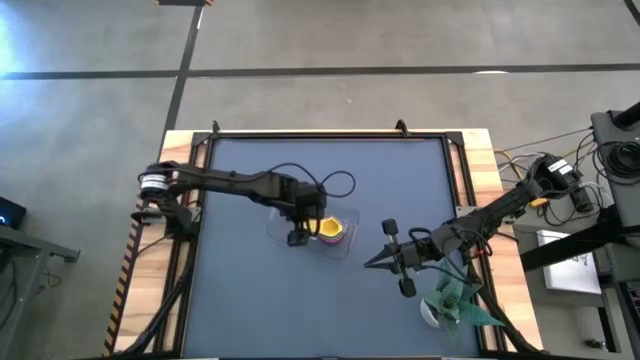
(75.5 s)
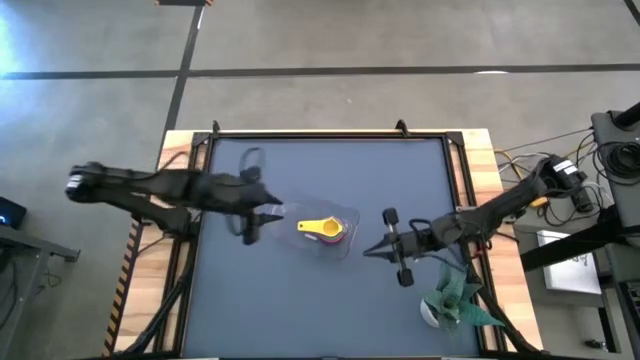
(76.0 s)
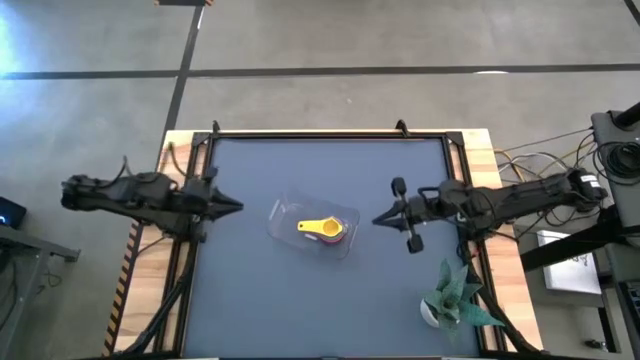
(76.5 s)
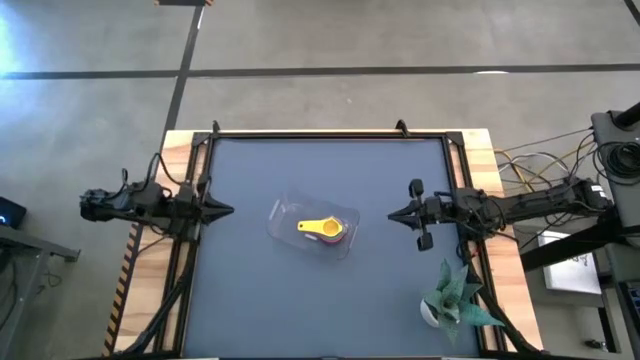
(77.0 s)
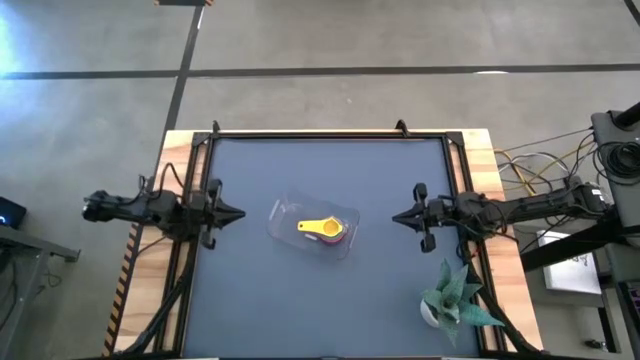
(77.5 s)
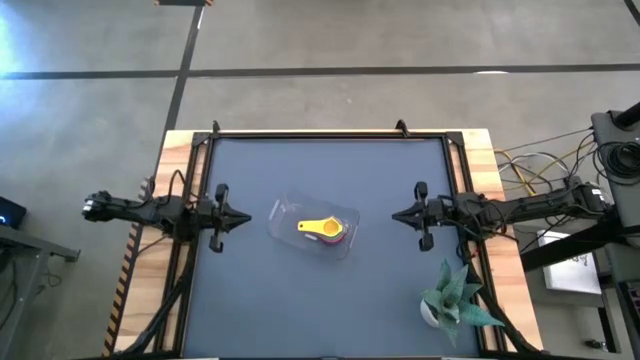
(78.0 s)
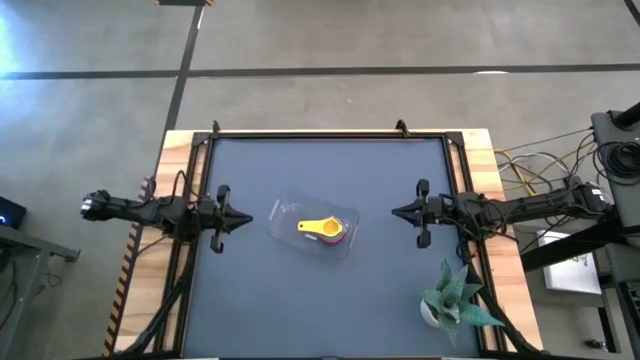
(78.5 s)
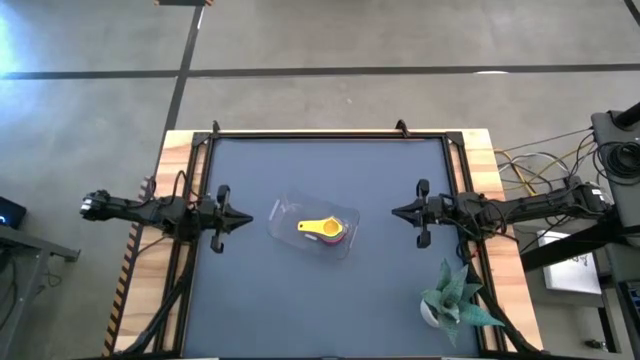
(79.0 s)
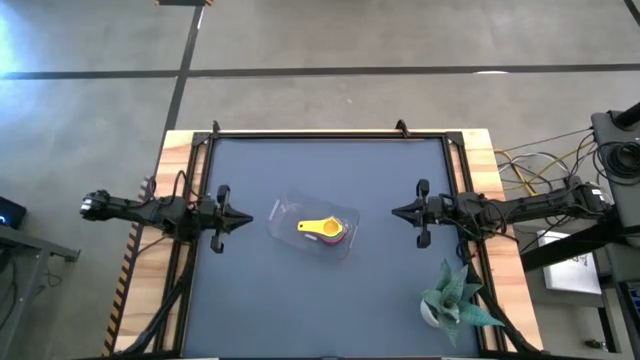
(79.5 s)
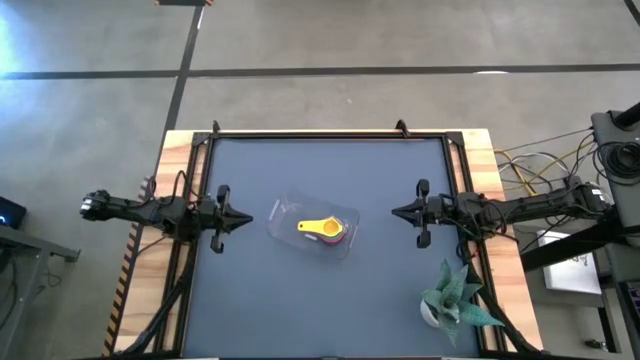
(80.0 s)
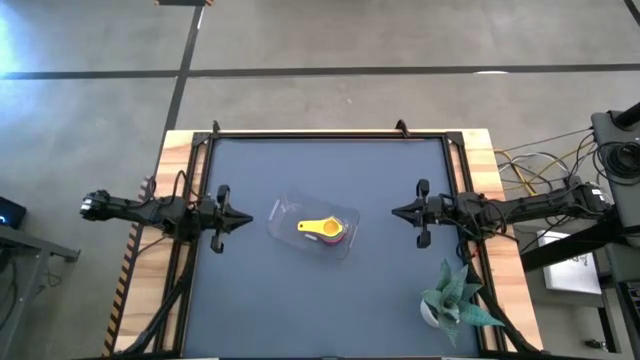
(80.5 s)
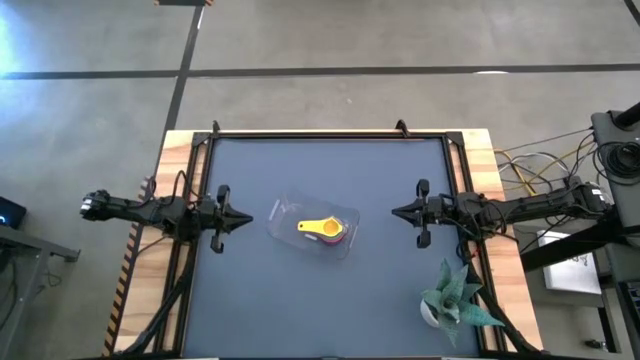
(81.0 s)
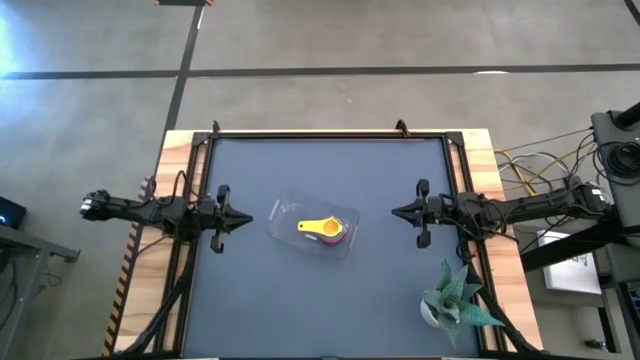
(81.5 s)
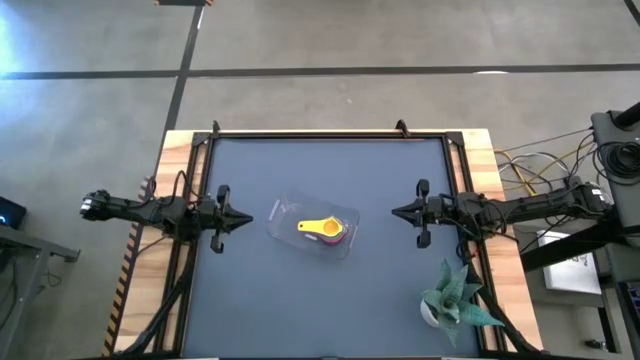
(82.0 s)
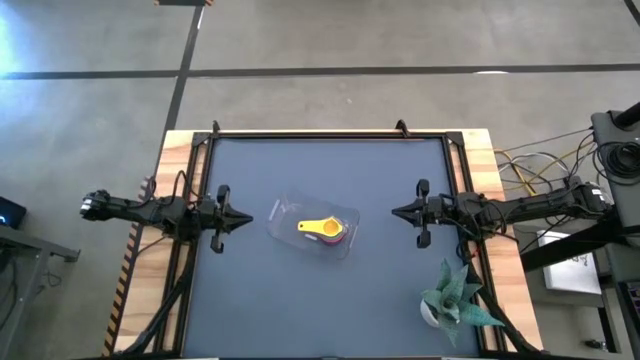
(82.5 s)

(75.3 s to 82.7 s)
Task: Nest measuring cups in basket
Return to Home Position

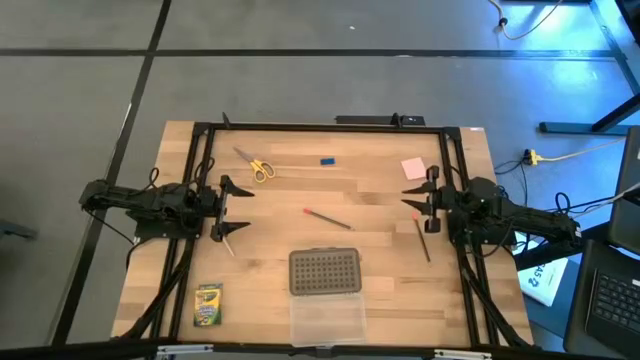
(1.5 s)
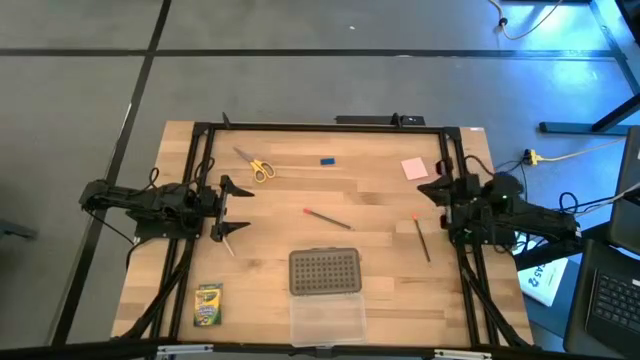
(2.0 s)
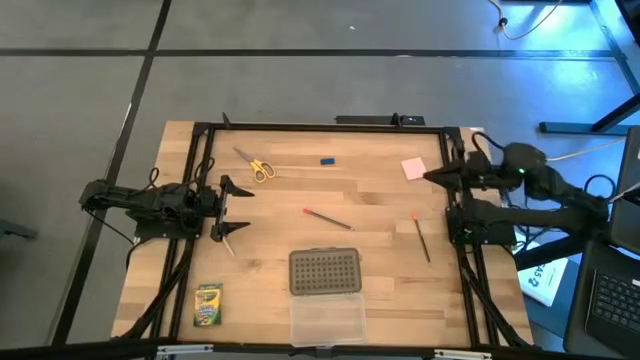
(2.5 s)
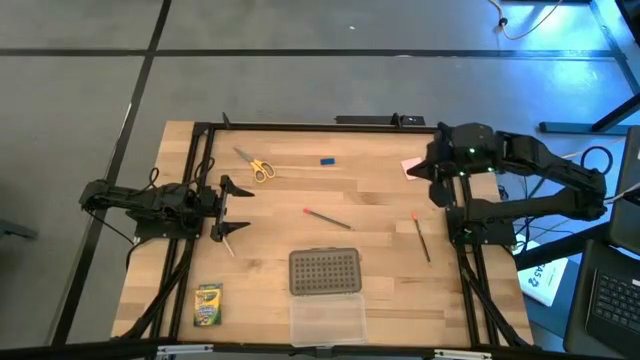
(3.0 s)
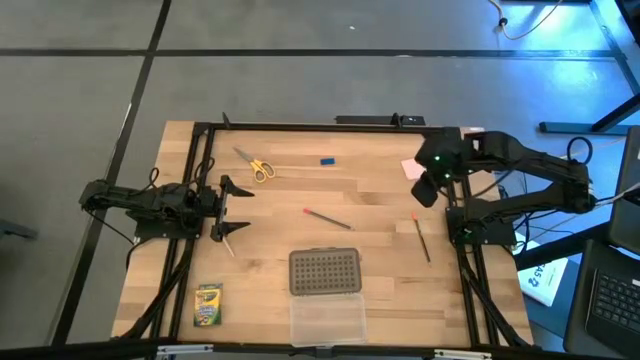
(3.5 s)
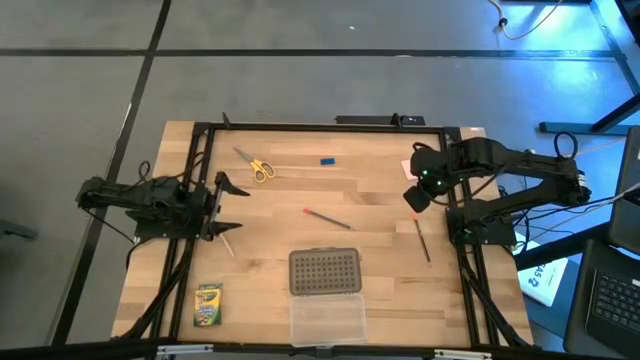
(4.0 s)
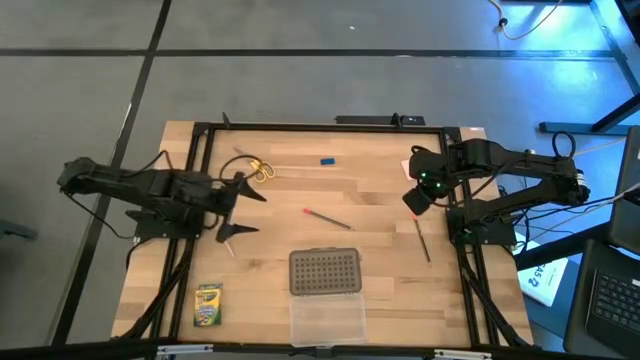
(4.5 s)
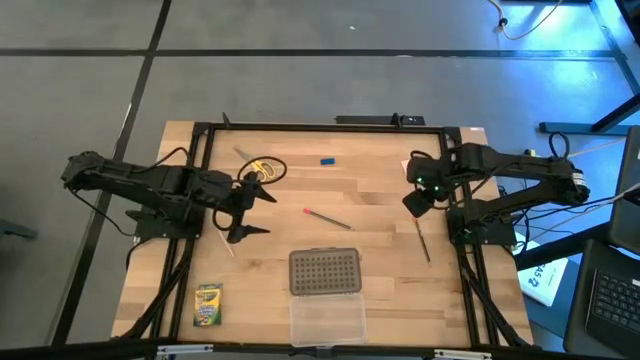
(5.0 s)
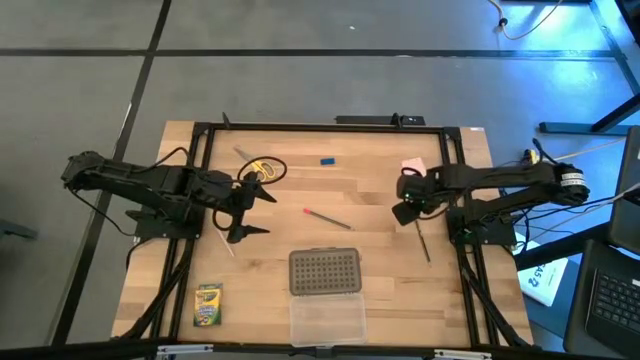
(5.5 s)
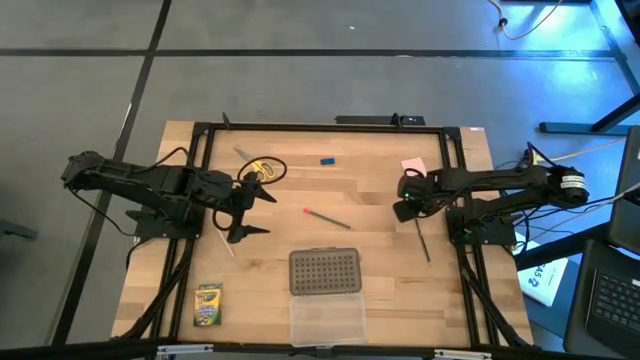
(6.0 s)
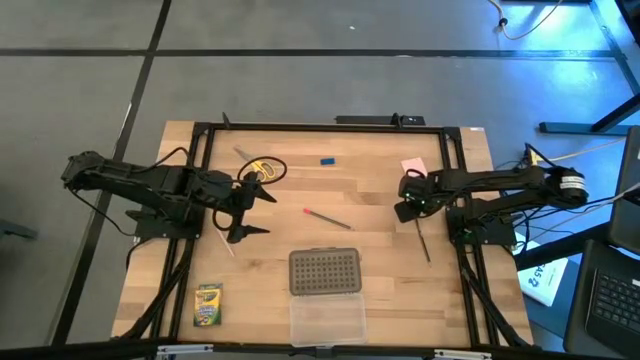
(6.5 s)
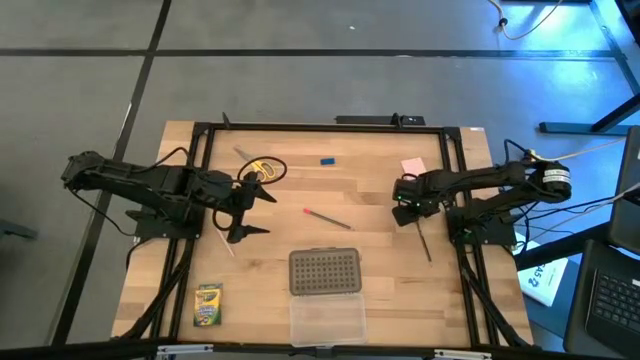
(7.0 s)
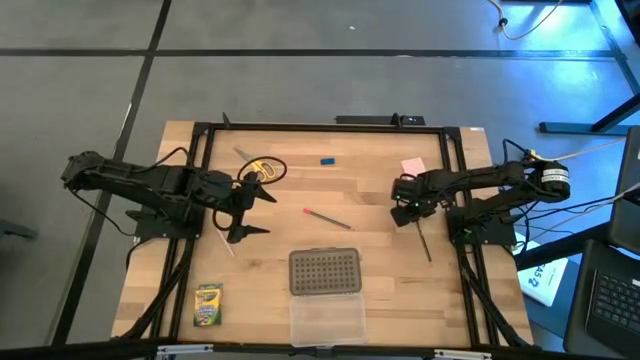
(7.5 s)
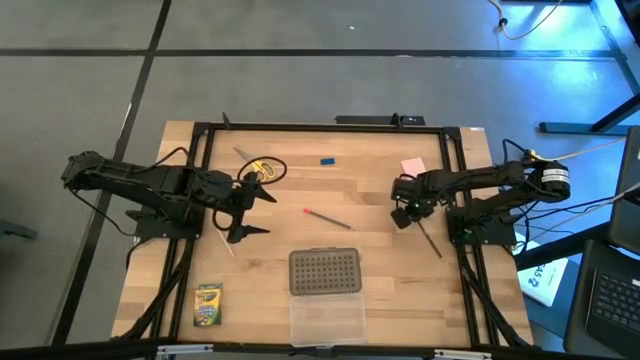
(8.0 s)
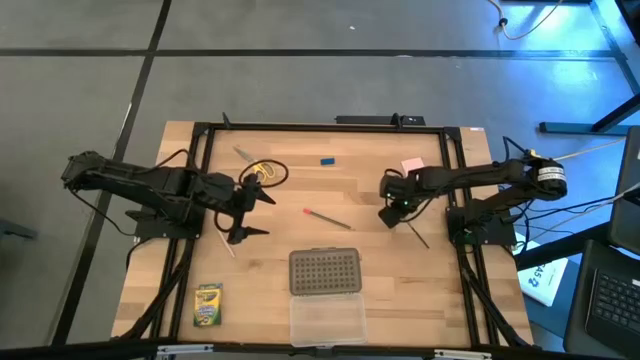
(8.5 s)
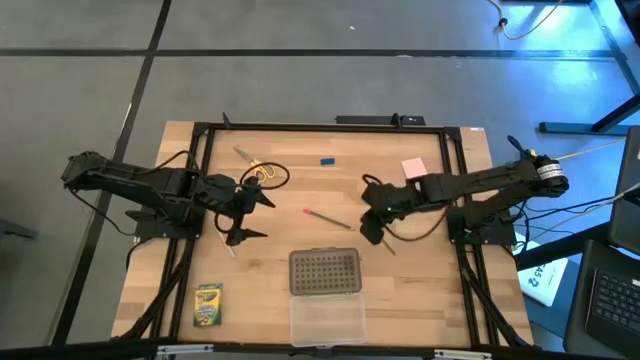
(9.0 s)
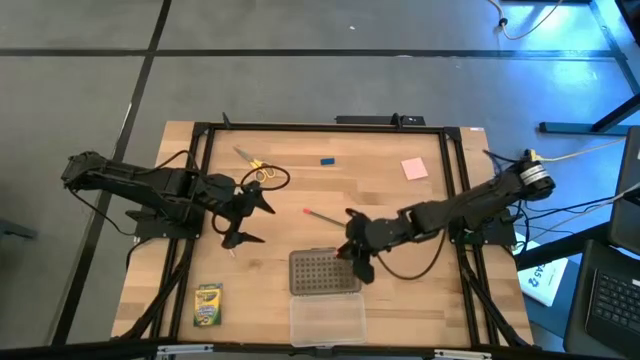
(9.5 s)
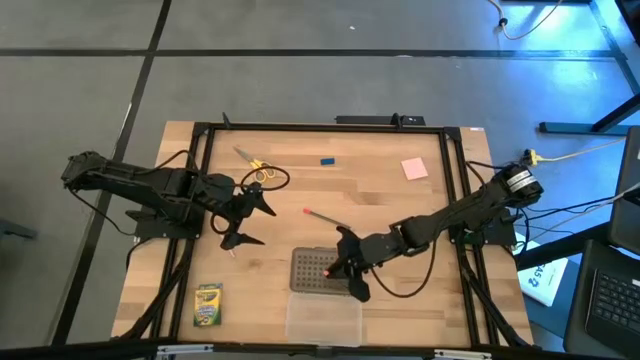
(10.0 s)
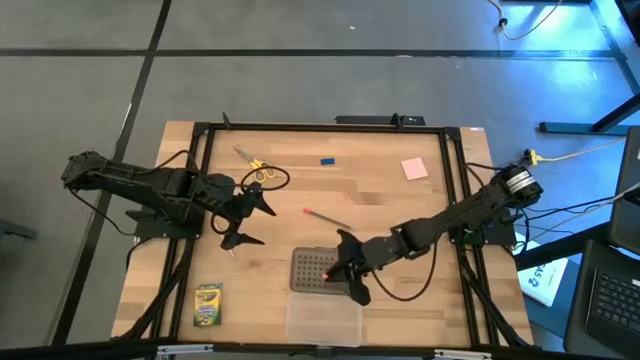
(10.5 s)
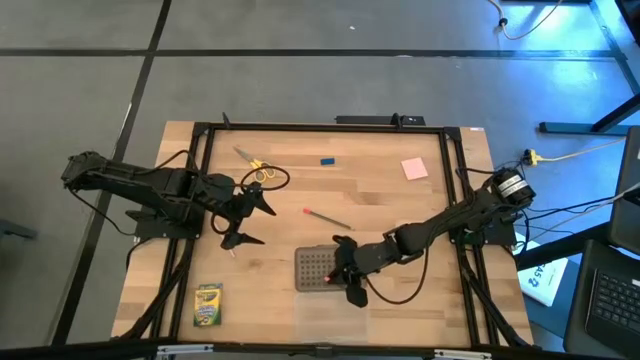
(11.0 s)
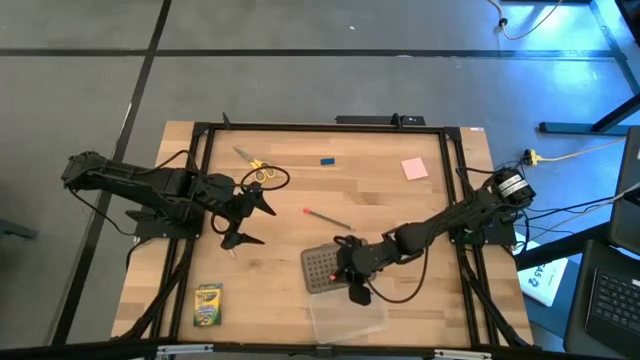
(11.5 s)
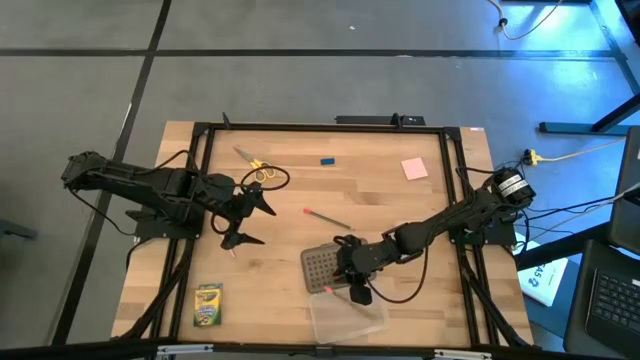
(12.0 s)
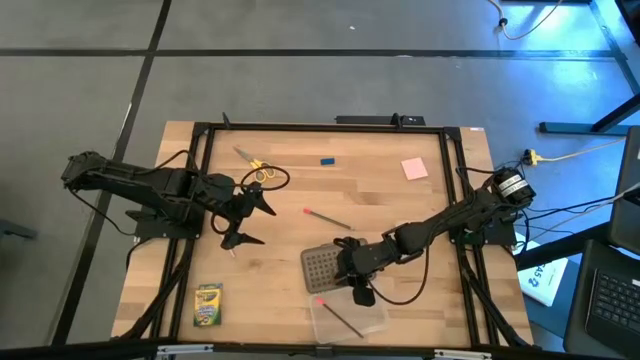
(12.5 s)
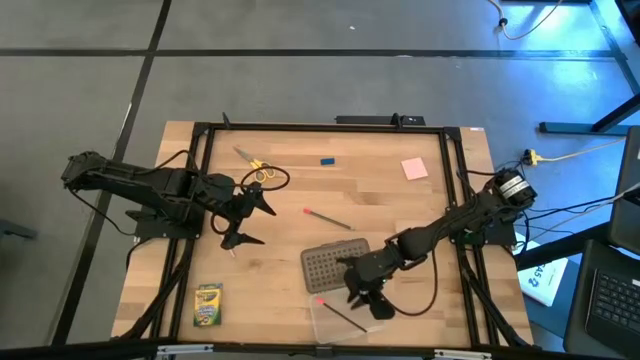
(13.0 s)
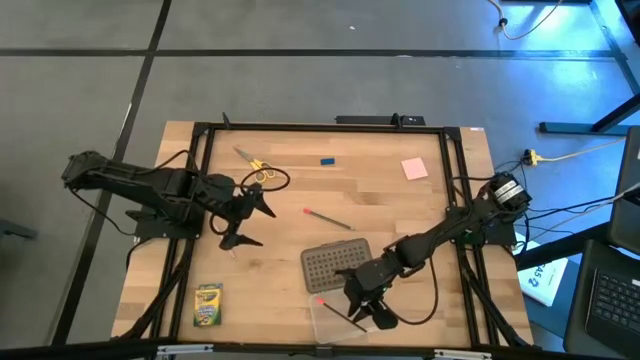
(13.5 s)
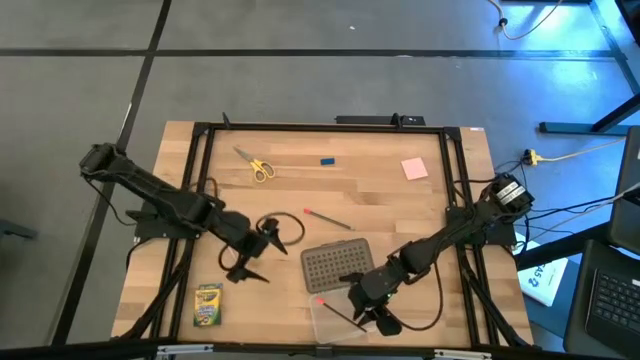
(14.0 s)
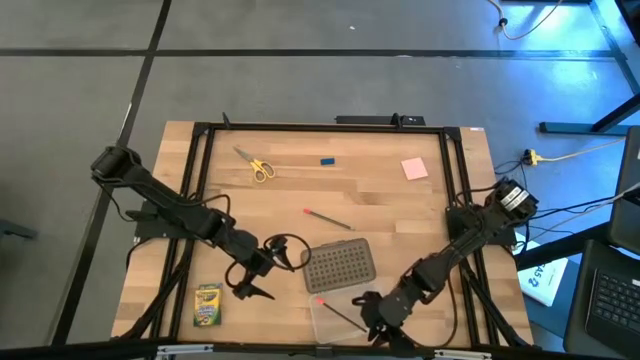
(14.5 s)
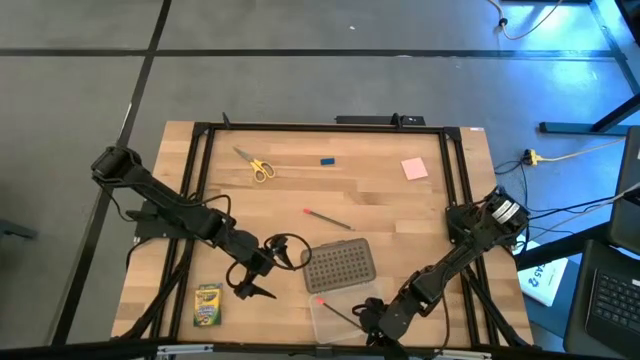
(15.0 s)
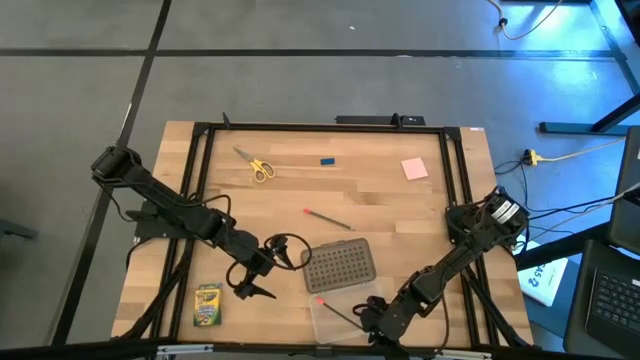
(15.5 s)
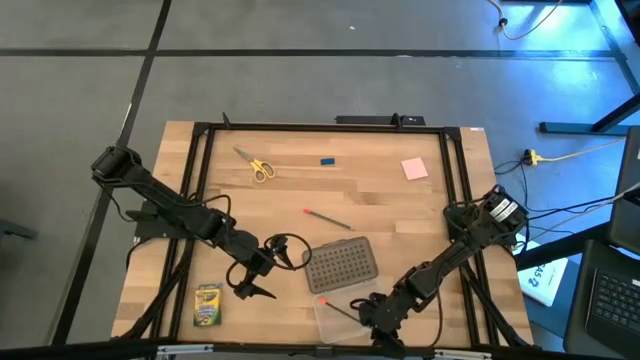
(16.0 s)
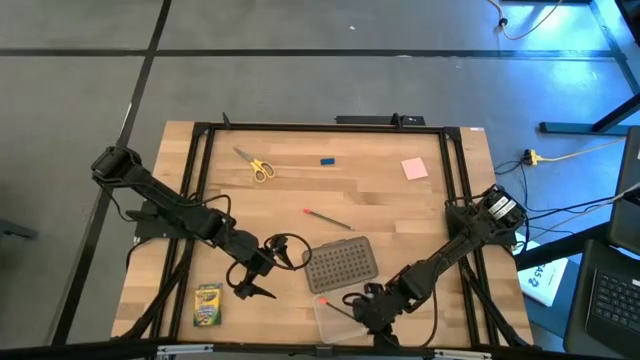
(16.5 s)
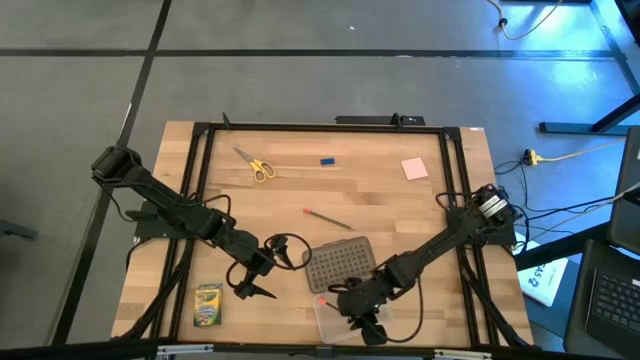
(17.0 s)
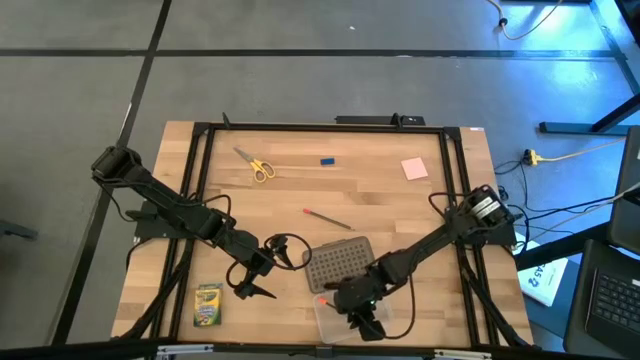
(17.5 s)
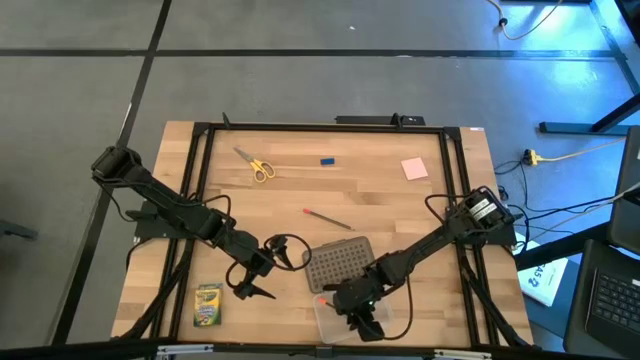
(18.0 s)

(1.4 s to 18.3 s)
Task: Pack school essentials
Put the orange and black pencil into the supply box
